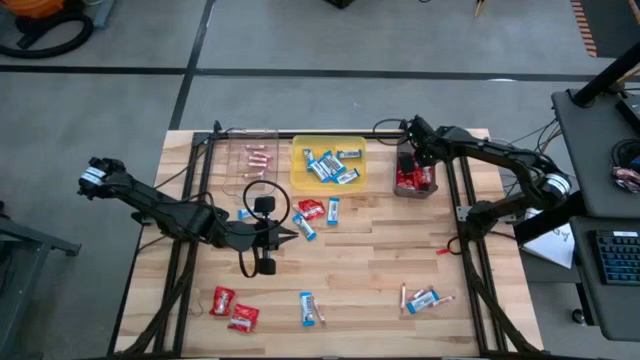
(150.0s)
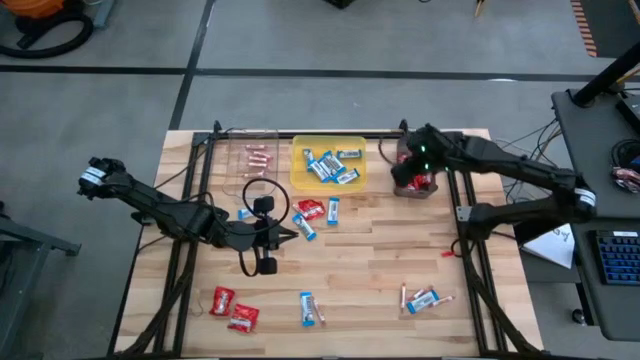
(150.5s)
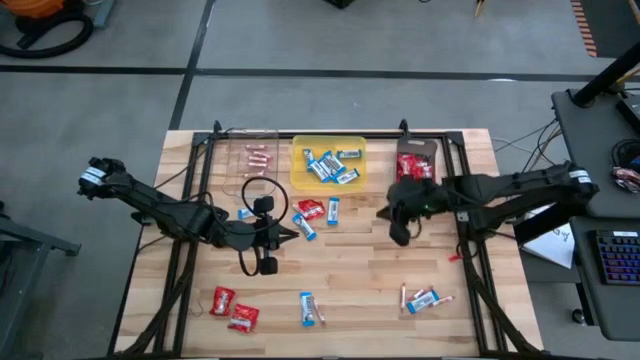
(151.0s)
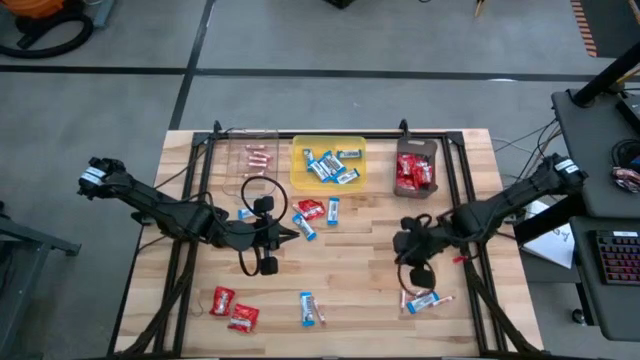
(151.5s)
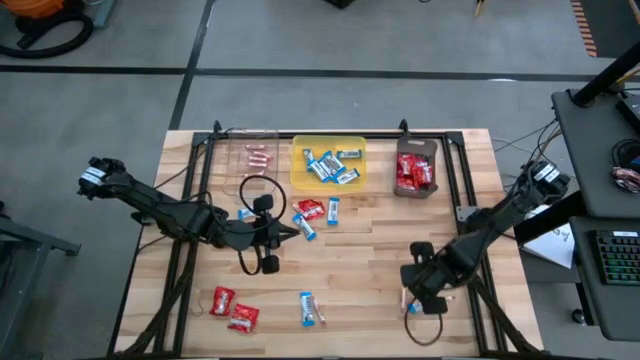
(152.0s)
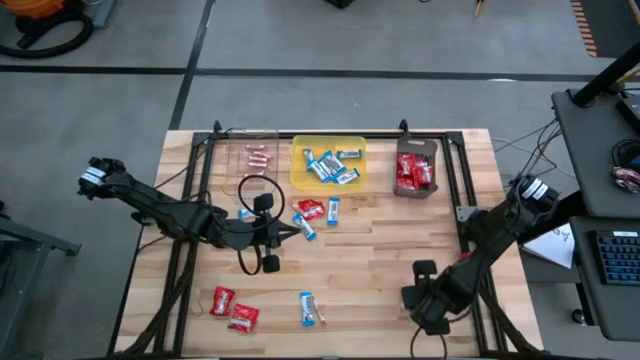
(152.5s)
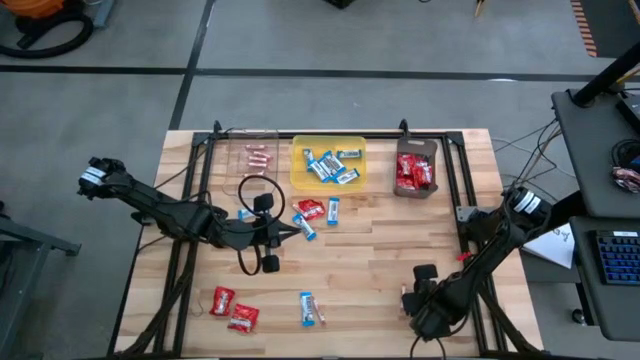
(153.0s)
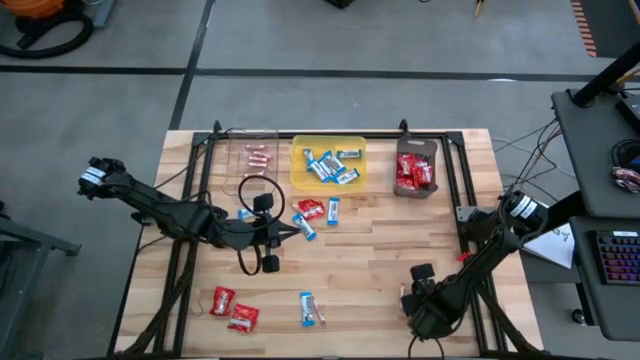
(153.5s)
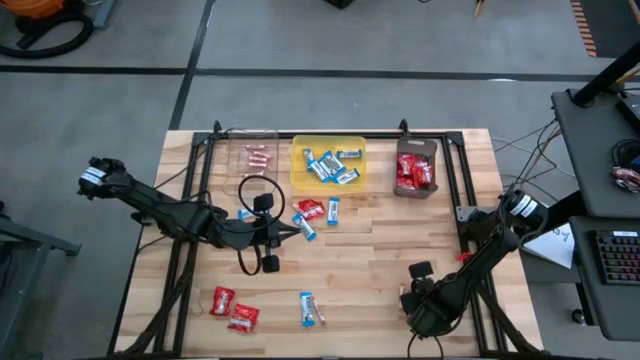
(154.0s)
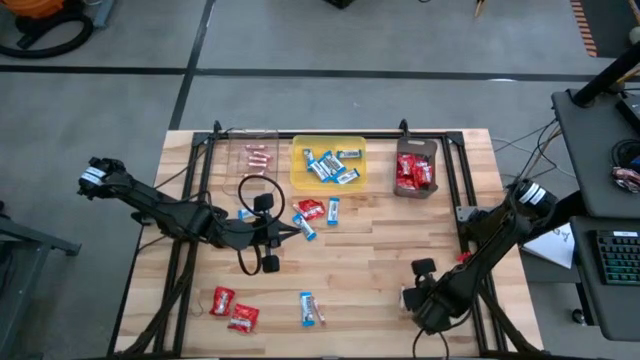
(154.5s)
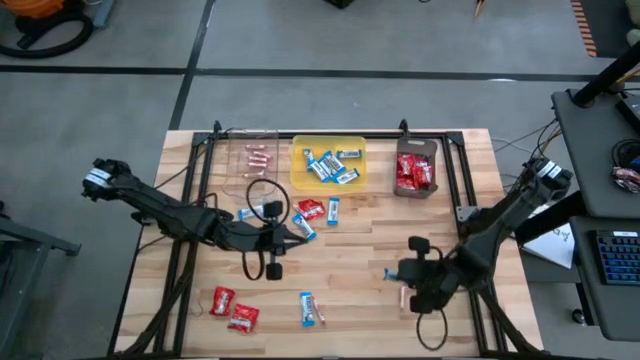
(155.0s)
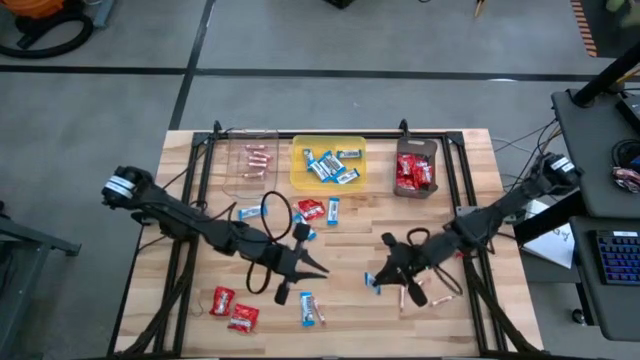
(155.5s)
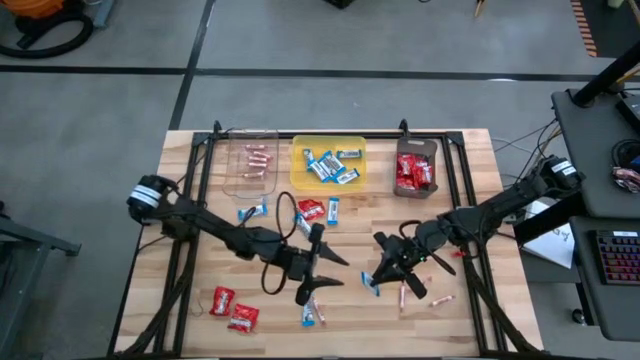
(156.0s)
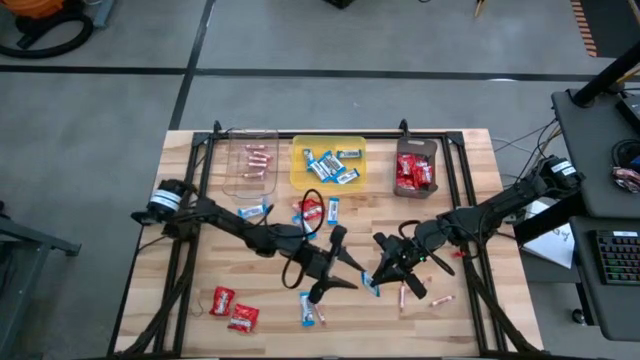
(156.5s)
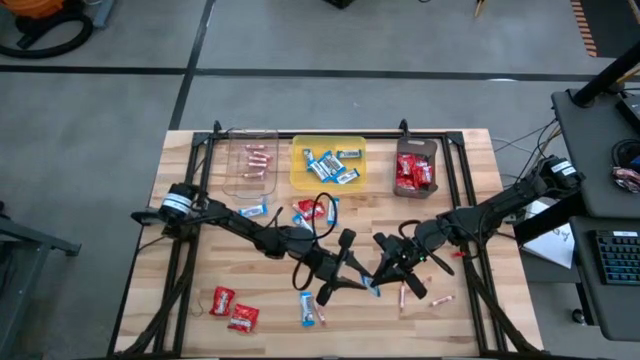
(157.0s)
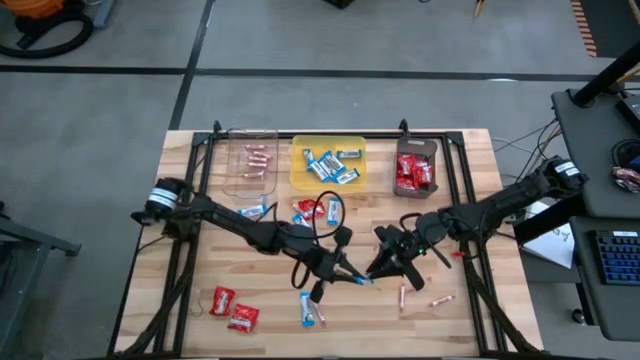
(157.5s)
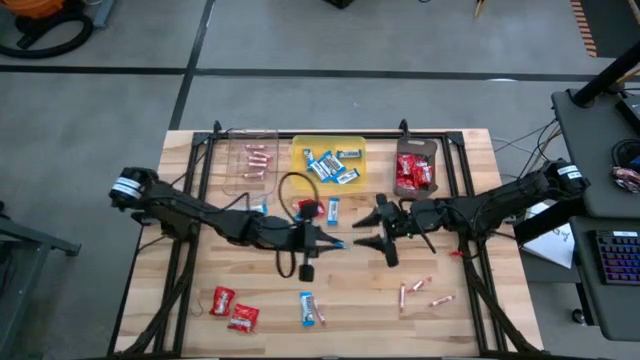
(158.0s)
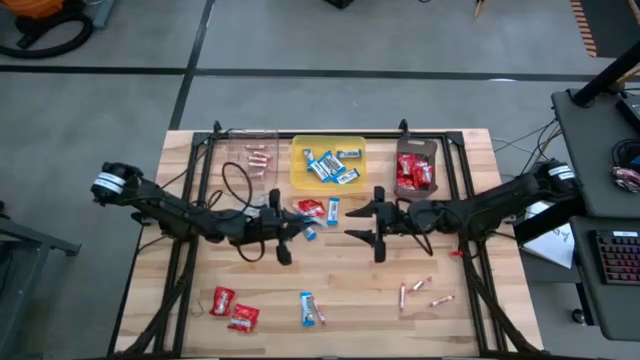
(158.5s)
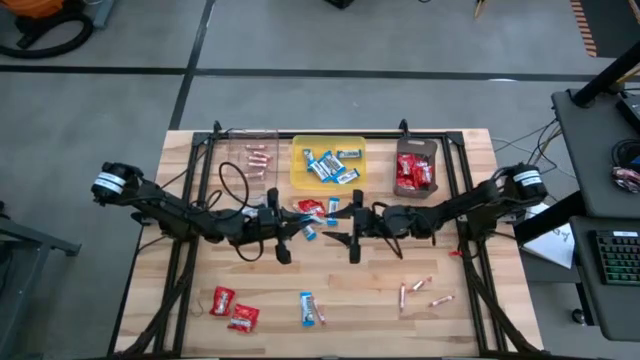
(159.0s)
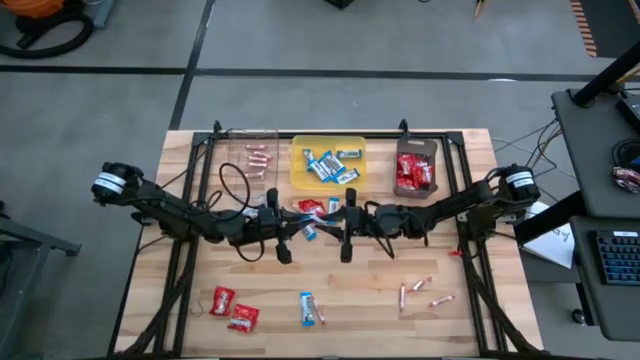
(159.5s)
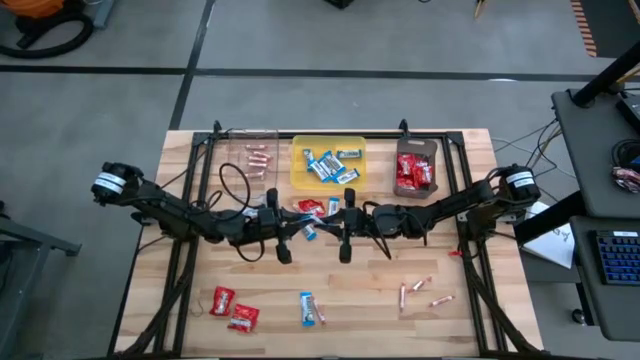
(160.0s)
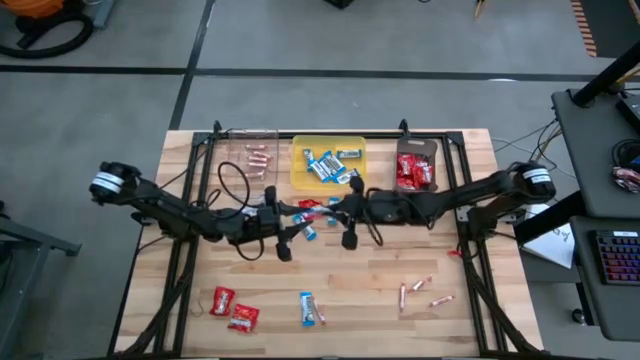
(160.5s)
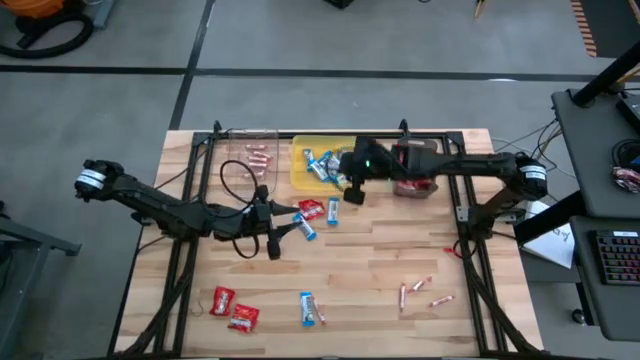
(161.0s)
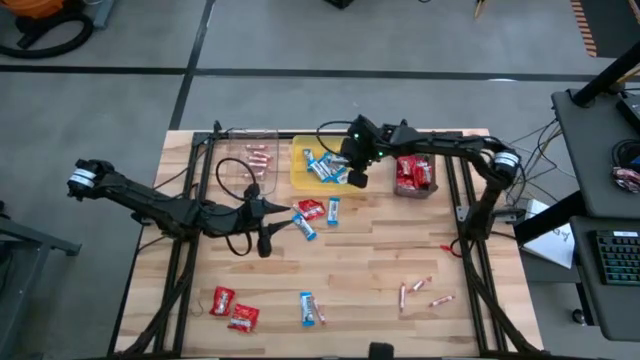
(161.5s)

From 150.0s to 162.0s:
Task: Sort candy
Put the white chocolate into the yellow bin

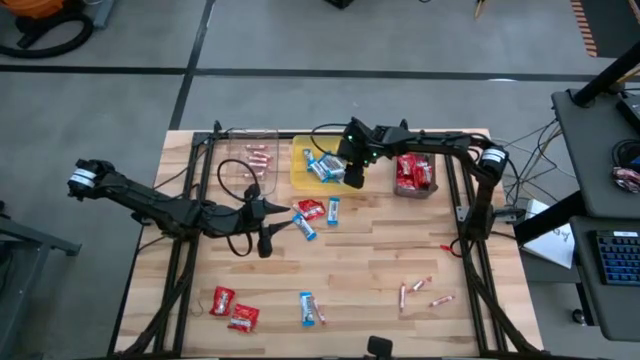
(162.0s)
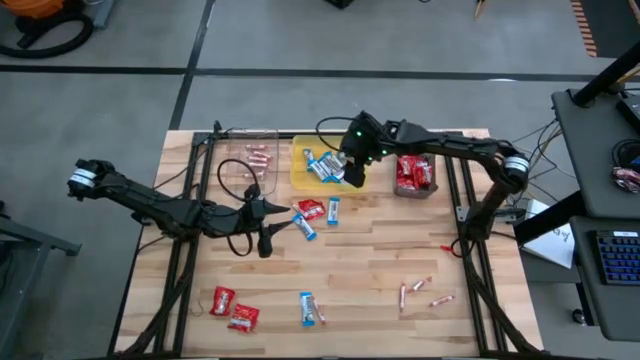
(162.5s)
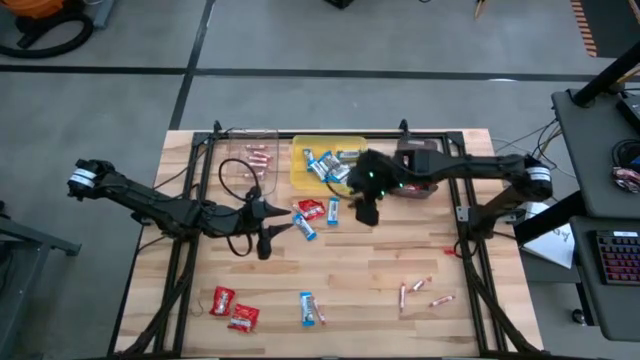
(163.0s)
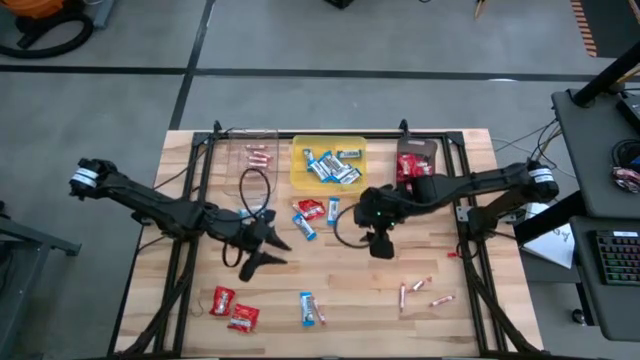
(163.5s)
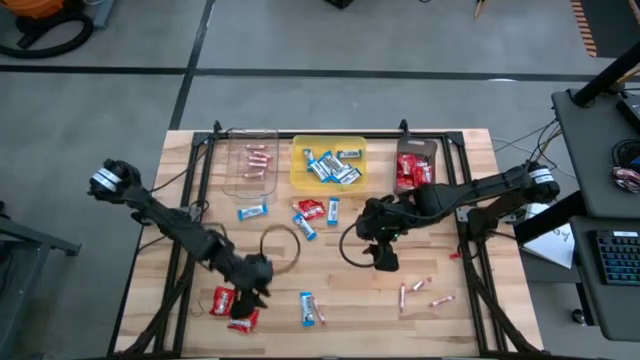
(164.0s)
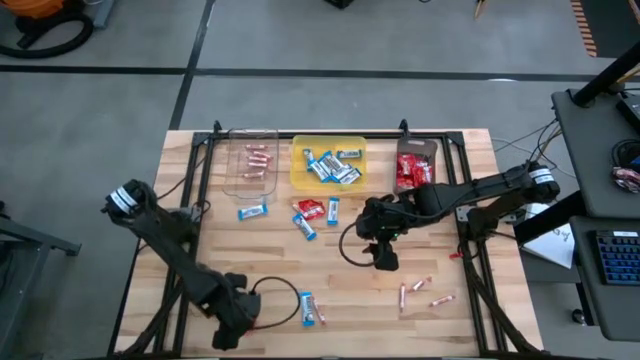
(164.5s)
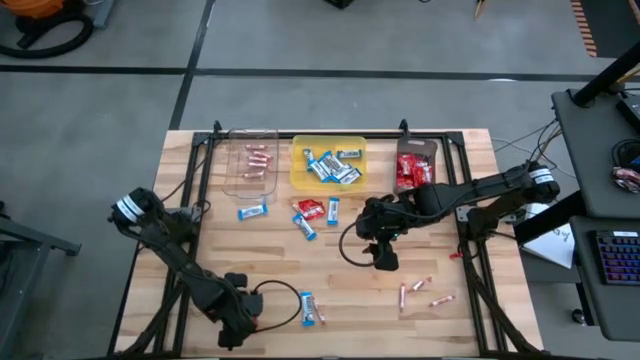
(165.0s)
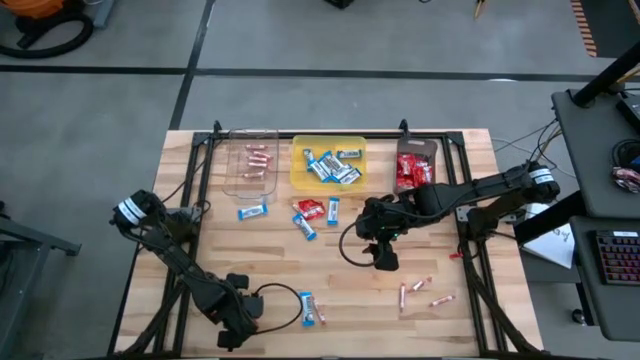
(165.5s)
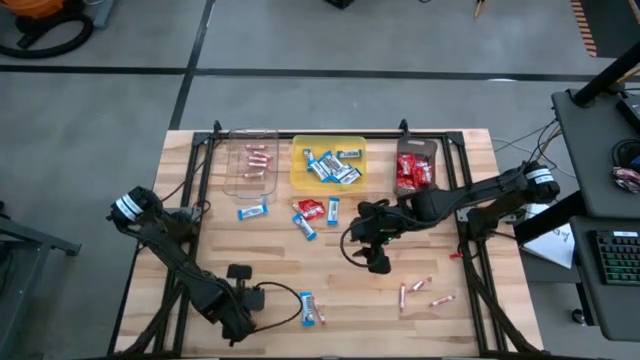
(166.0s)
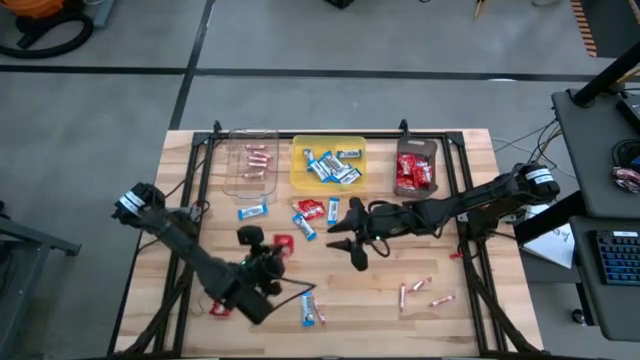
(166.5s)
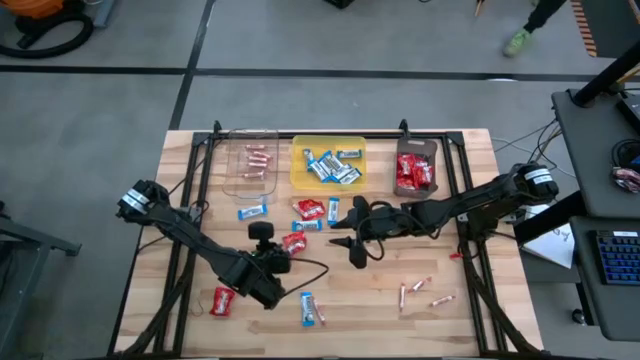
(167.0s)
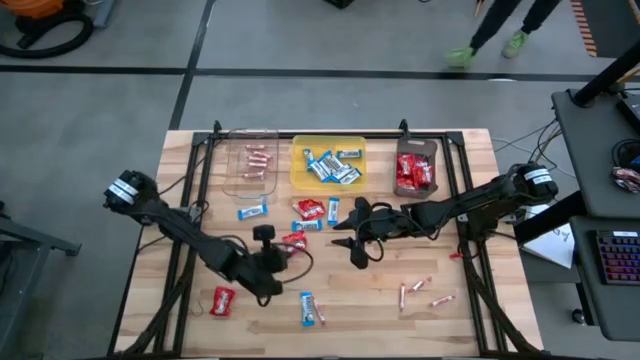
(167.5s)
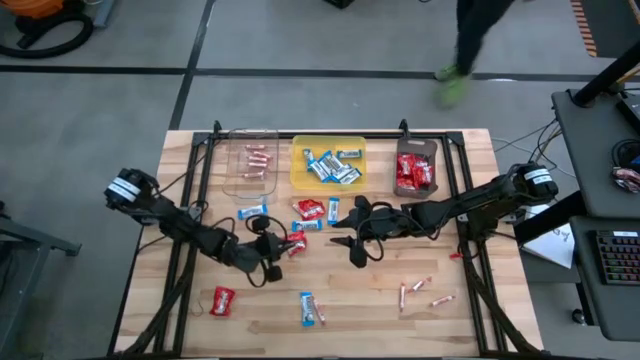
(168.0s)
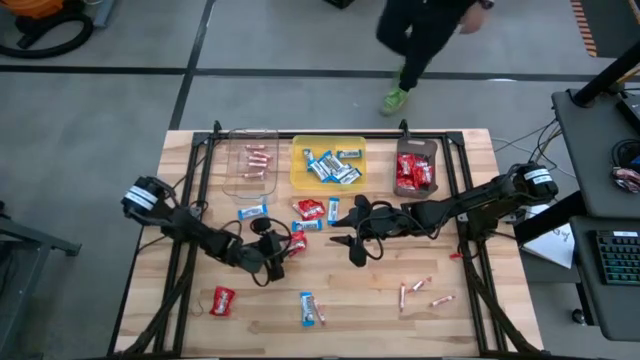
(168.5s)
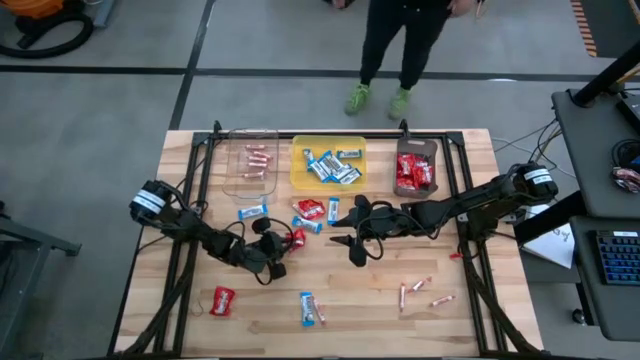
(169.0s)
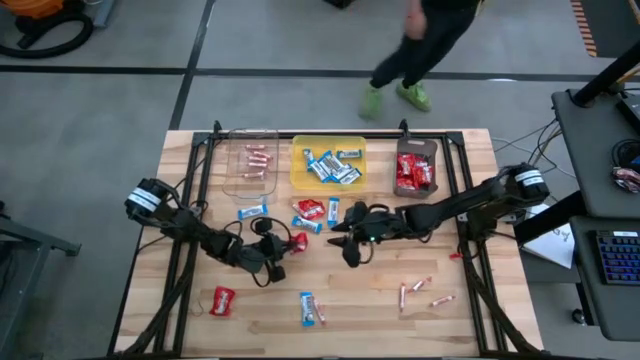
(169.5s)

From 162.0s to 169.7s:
Put the red candy into the black bin

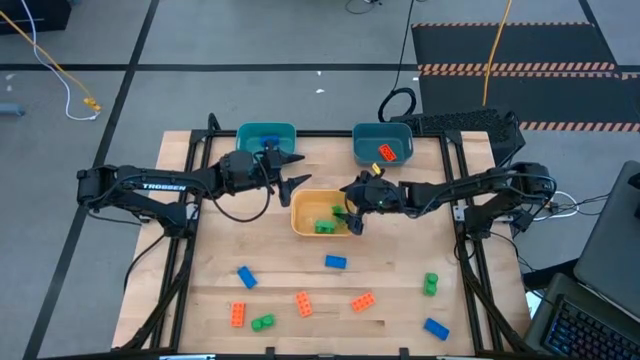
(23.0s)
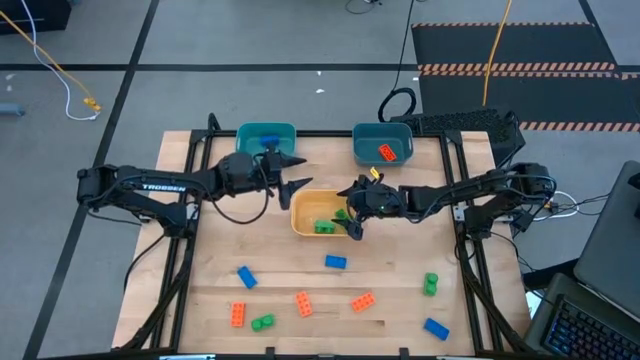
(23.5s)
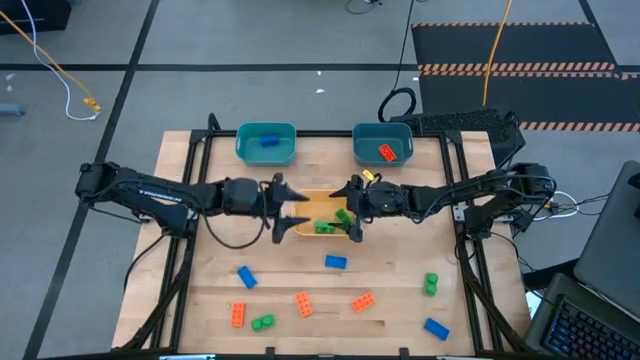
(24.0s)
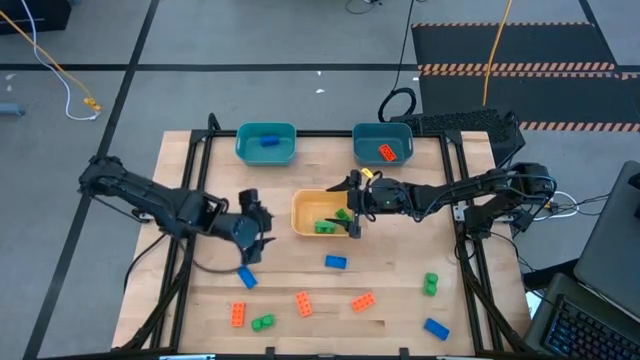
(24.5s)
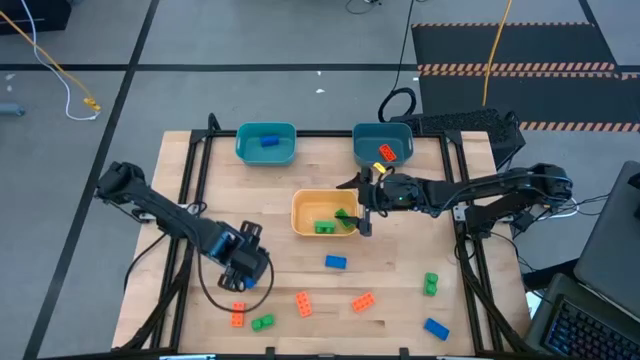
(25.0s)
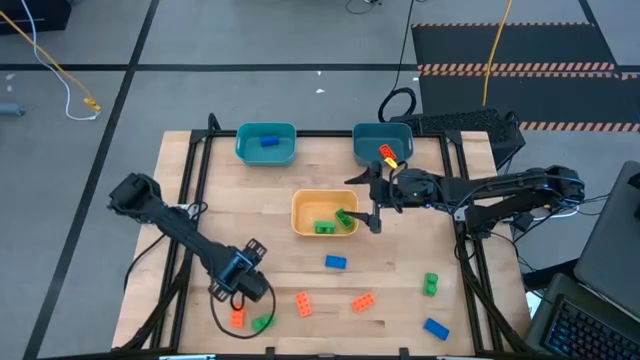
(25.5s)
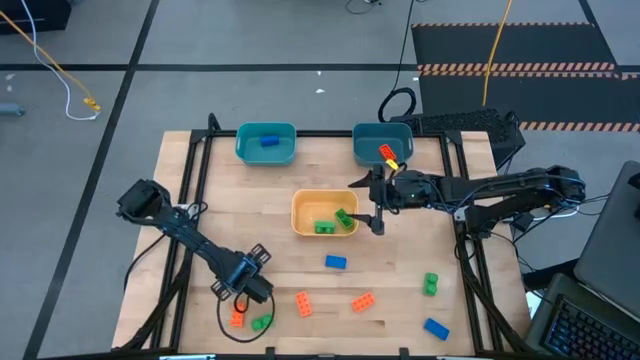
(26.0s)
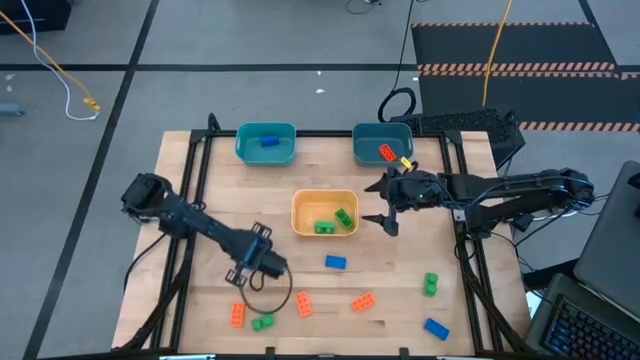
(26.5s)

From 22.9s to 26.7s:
Task: Sort & place blocks by color
Put the blue game piece into the green bin
